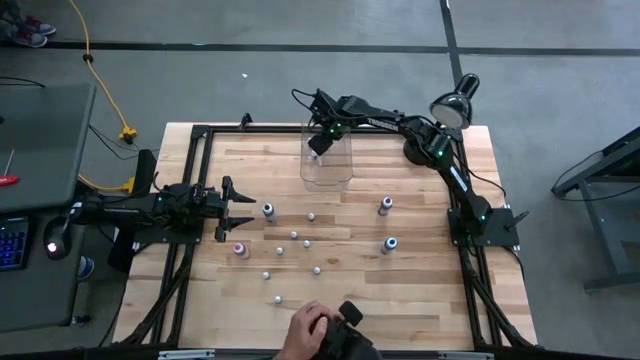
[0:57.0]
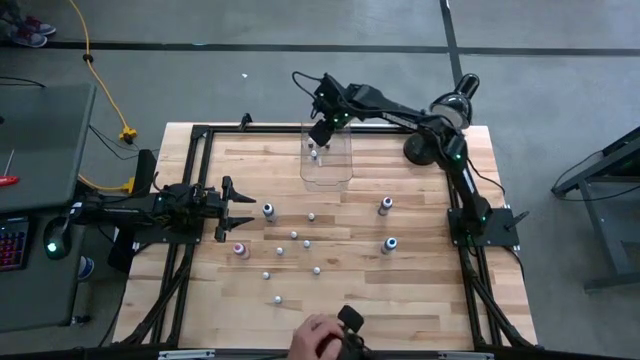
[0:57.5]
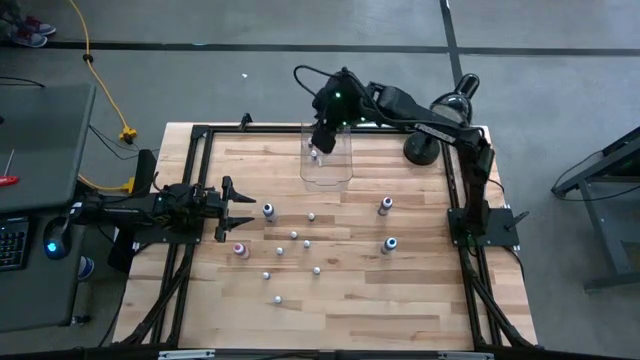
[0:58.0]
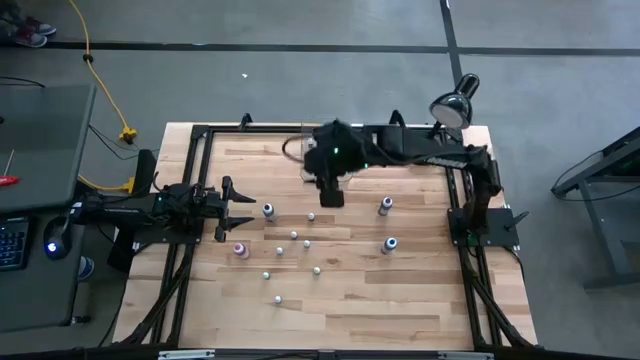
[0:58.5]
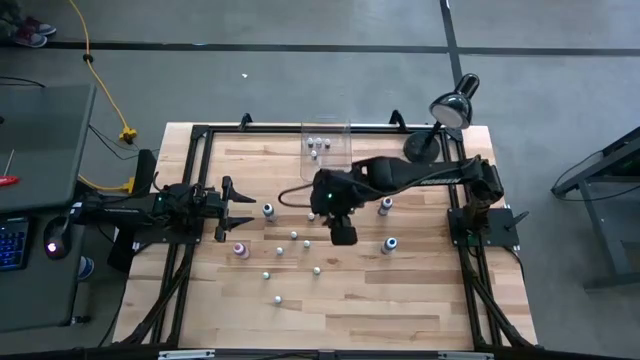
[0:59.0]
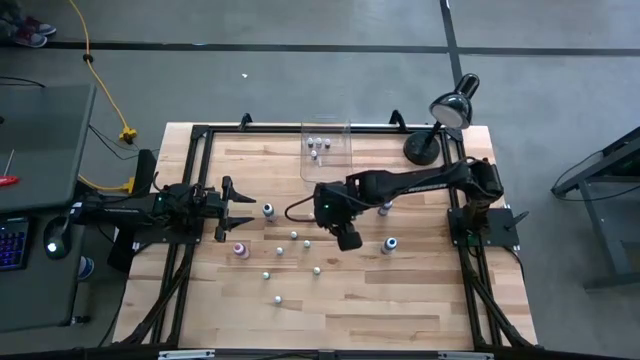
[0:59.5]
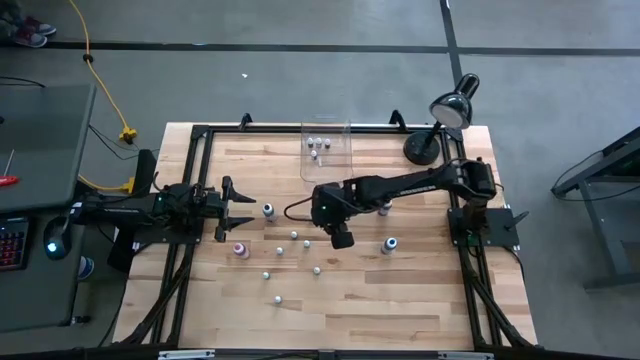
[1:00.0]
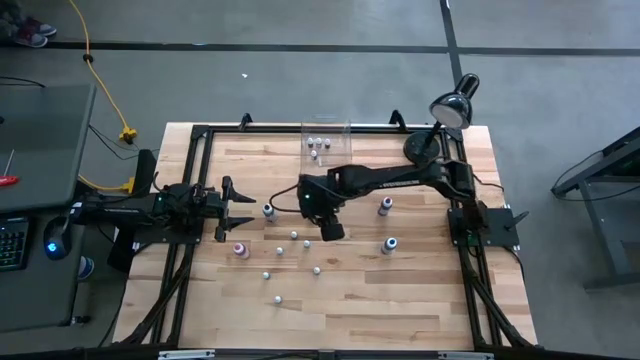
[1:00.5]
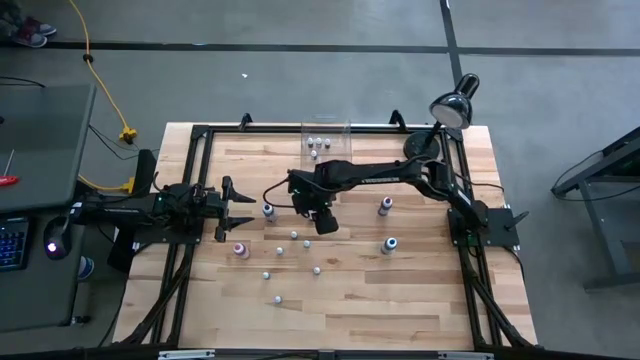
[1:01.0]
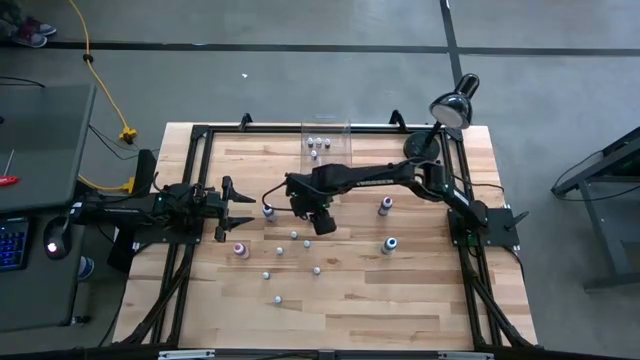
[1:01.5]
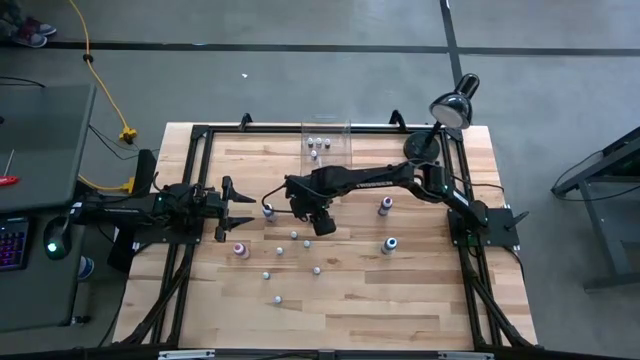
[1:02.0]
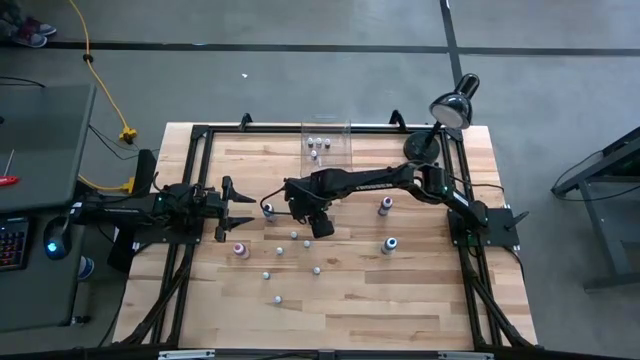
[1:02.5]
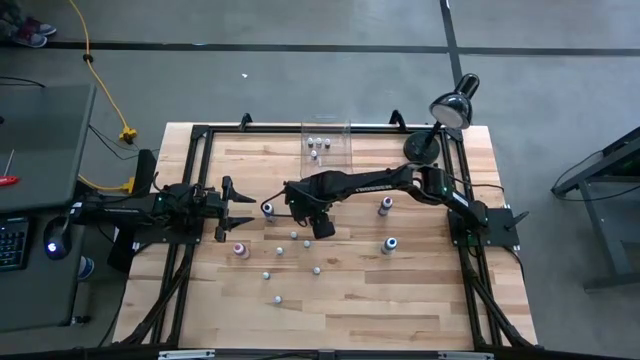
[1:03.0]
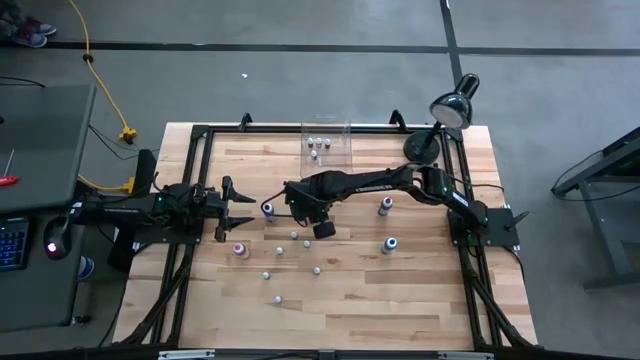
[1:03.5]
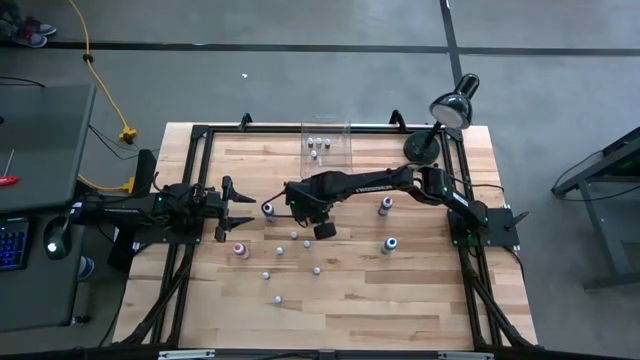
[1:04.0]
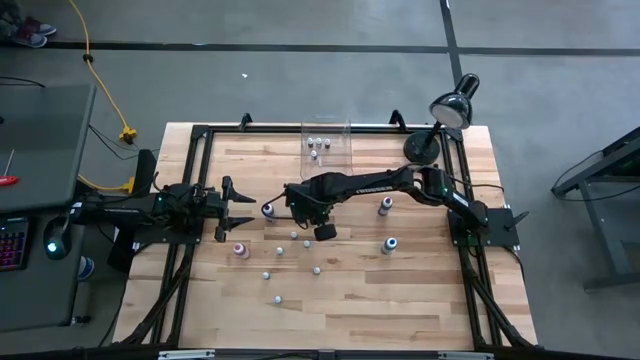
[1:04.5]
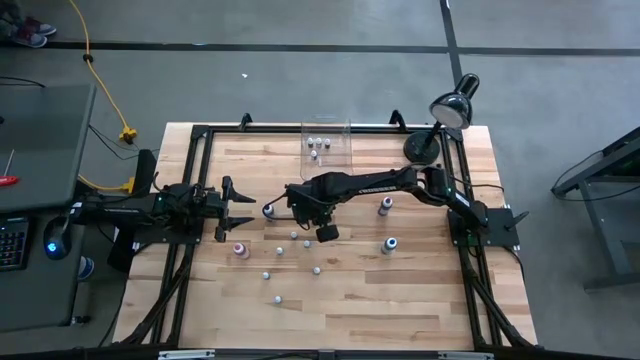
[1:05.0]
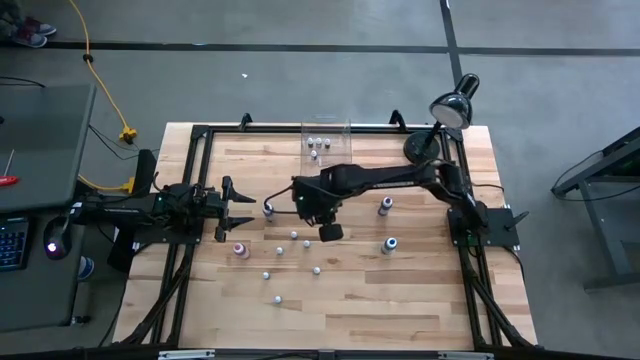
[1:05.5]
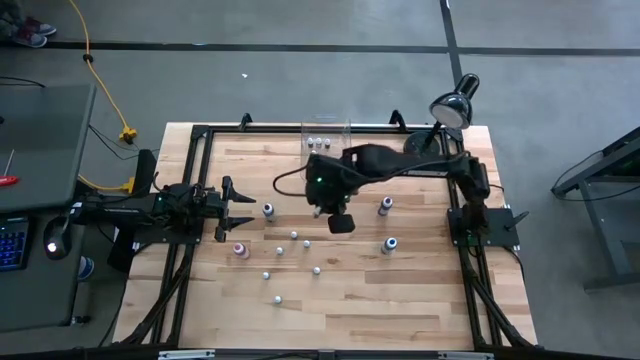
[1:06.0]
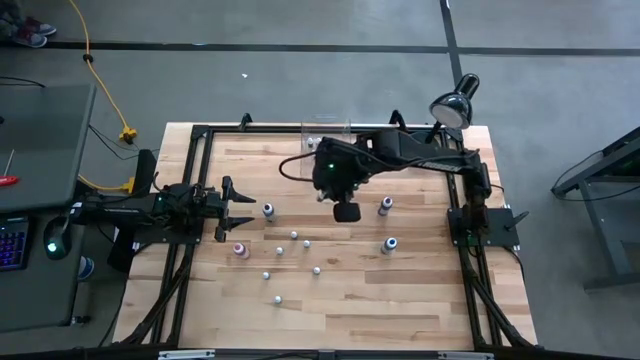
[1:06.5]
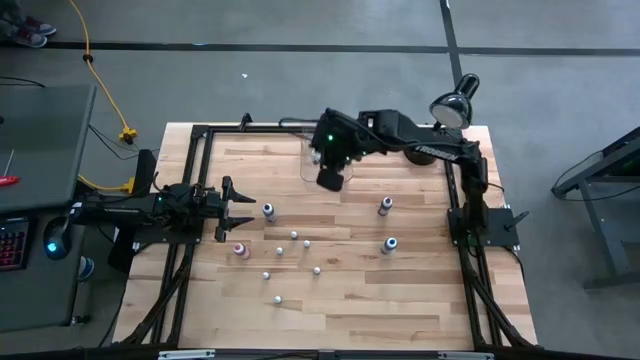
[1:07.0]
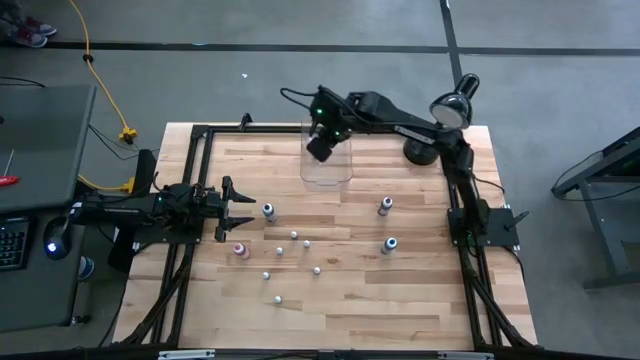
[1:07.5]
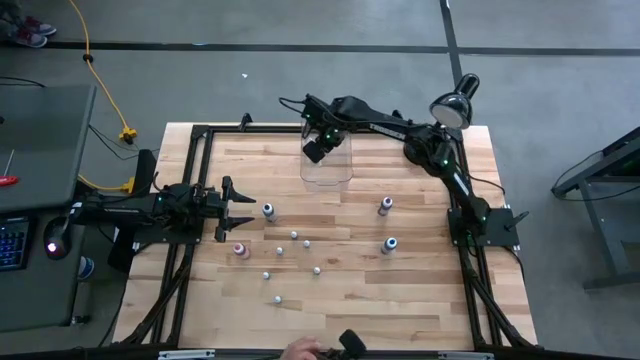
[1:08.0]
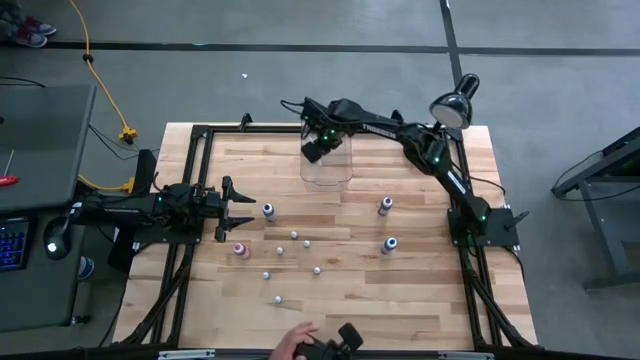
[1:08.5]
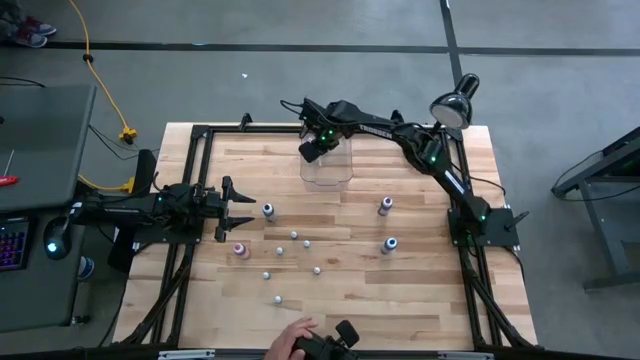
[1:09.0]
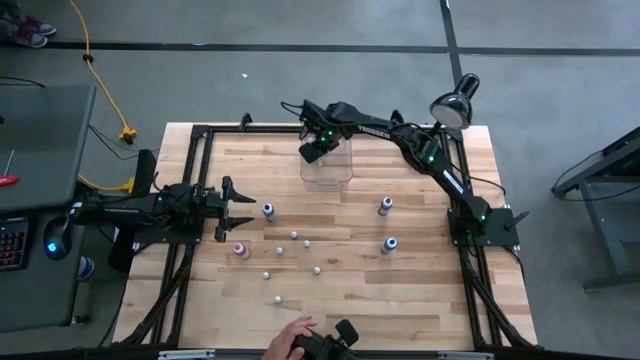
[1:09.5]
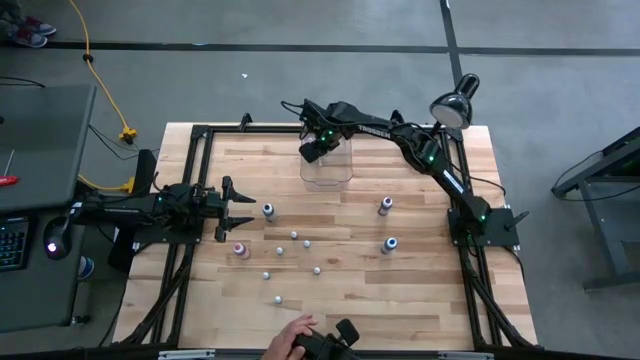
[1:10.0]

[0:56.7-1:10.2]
Task: Pick & Place food coloring
Put the small food coloring bottle into the transparent bin

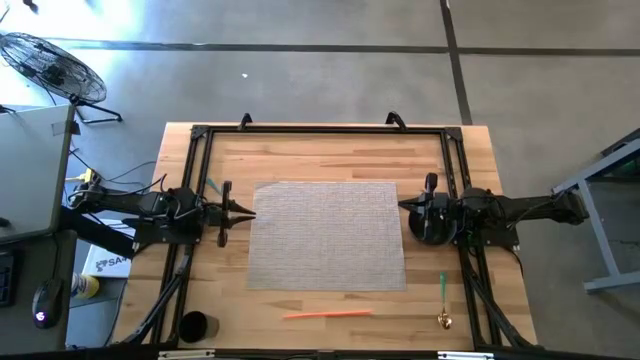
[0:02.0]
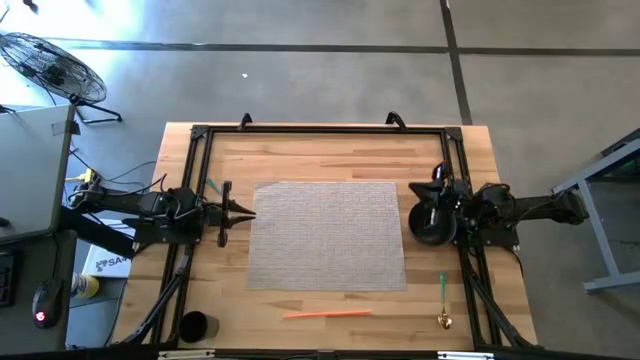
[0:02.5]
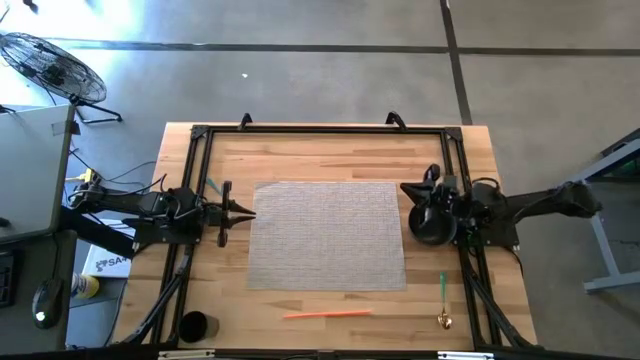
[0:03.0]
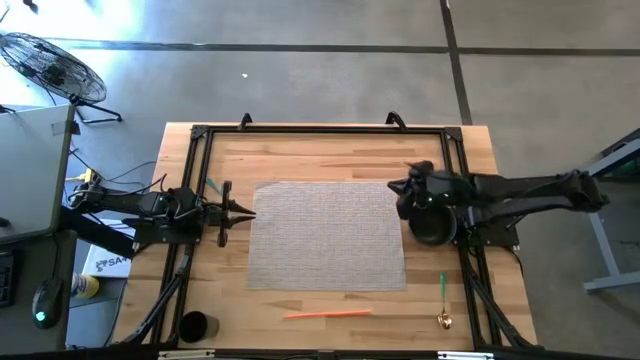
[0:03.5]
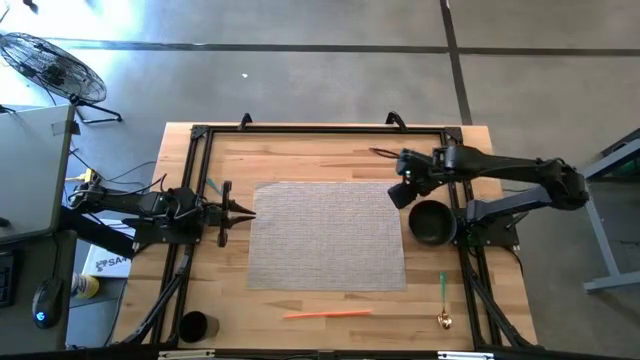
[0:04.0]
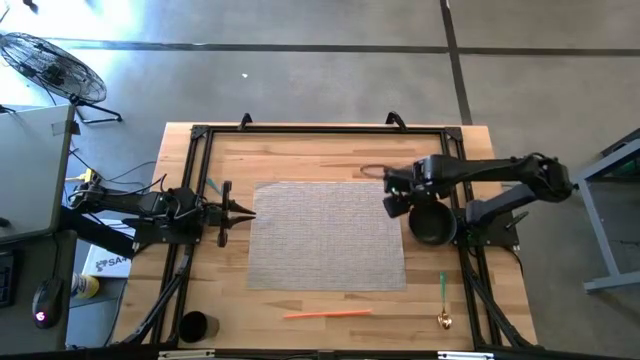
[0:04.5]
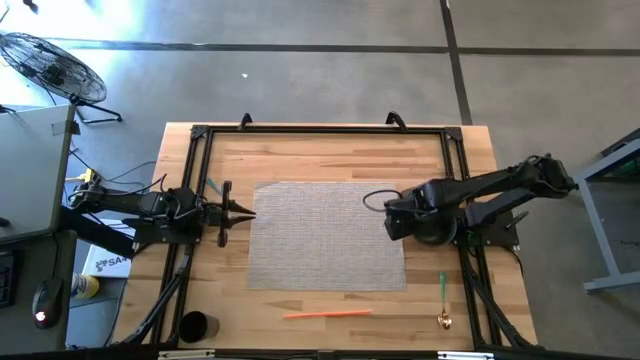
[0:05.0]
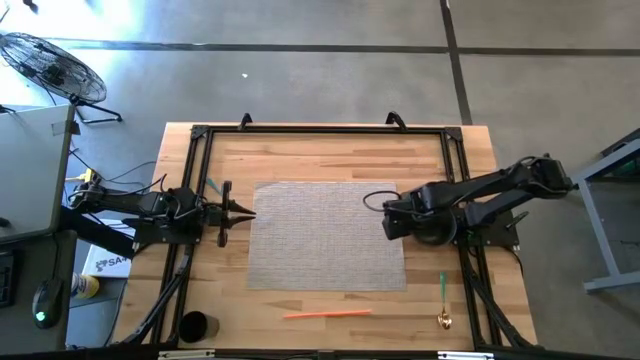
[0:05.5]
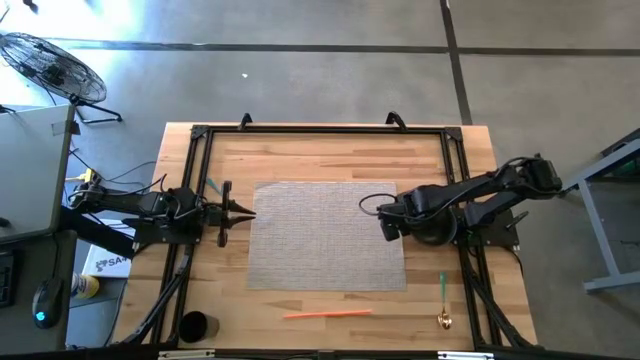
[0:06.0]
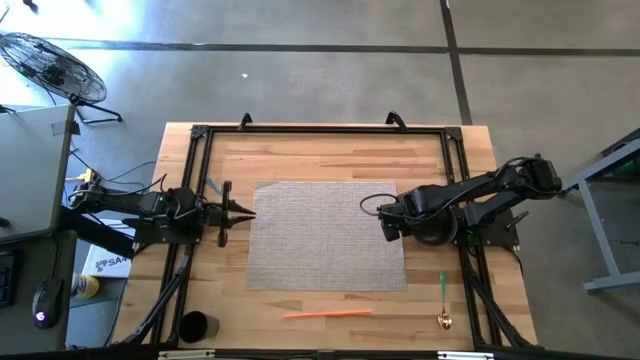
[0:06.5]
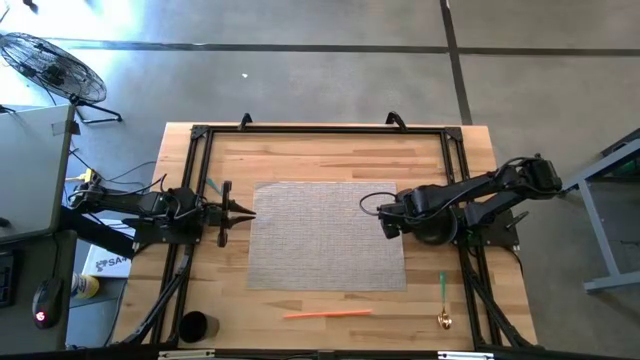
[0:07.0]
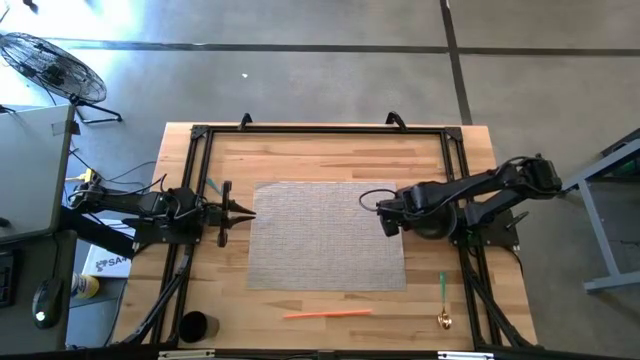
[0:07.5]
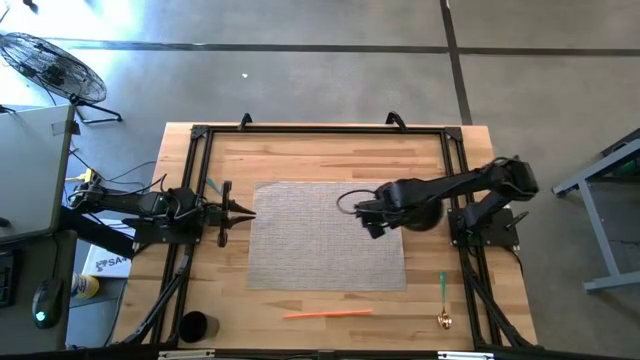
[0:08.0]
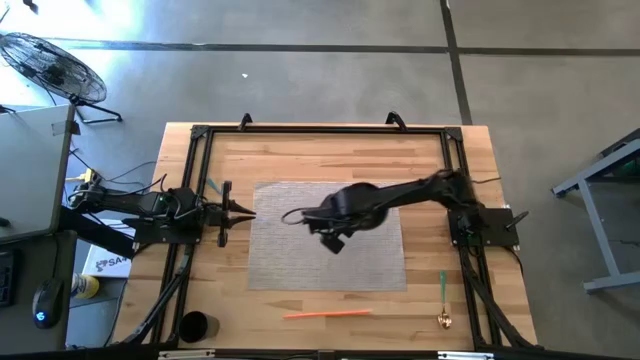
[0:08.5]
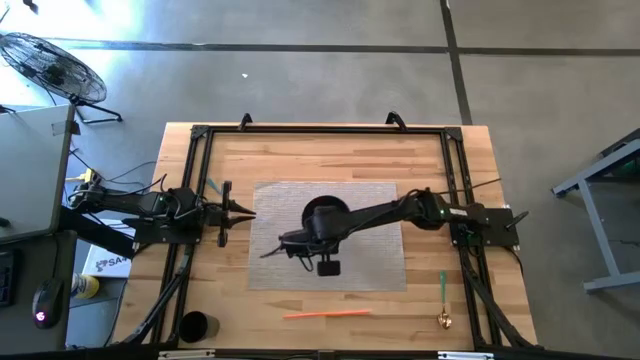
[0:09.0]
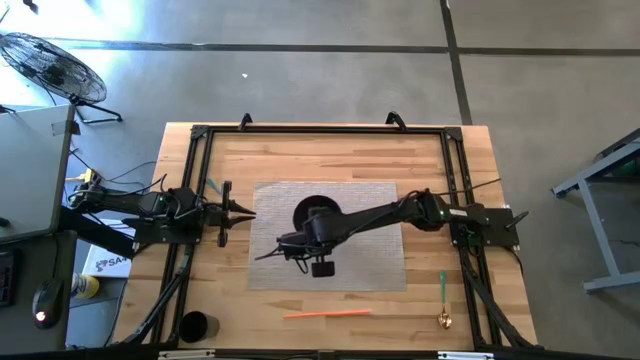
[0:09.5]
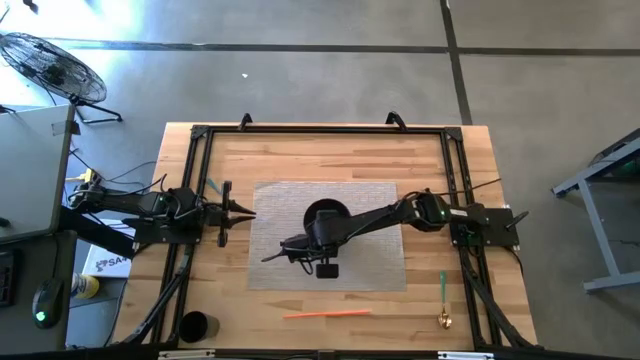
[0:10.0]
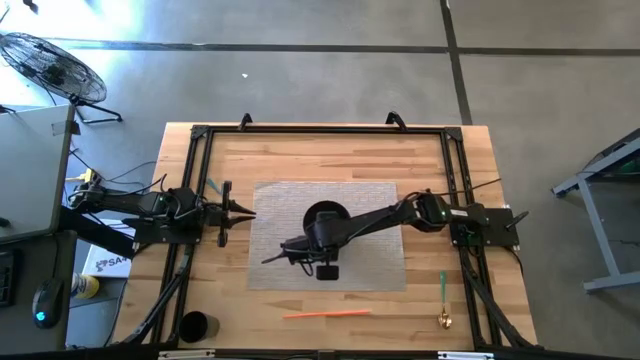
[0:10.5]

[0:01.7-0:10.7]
Task: Pick & Place Utensil
Put the black bowl on the gray mat
